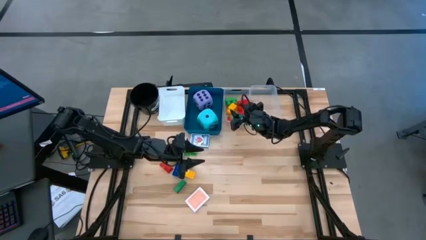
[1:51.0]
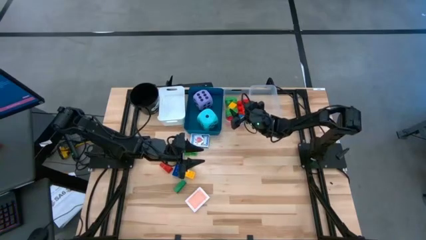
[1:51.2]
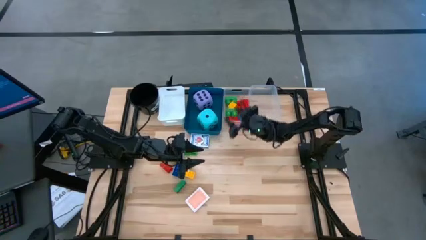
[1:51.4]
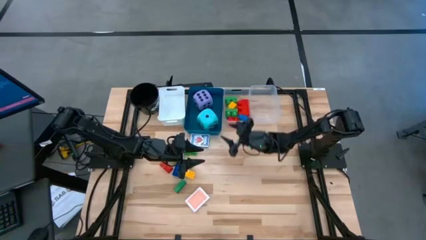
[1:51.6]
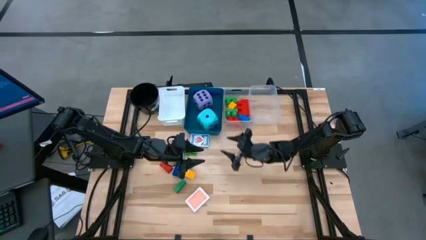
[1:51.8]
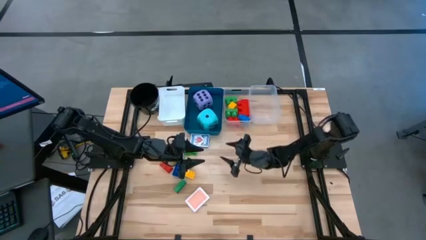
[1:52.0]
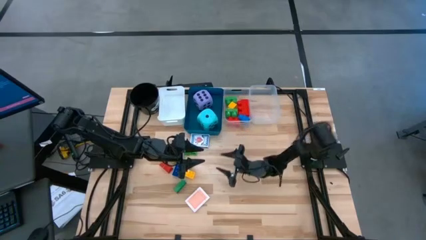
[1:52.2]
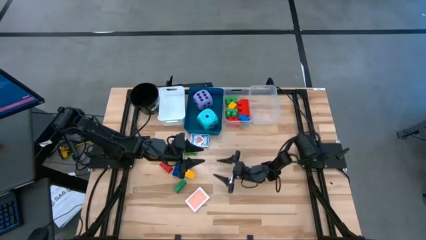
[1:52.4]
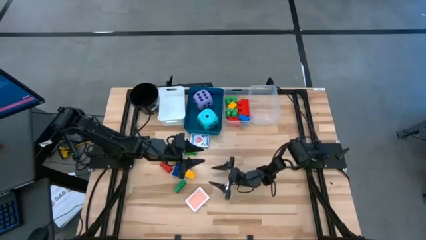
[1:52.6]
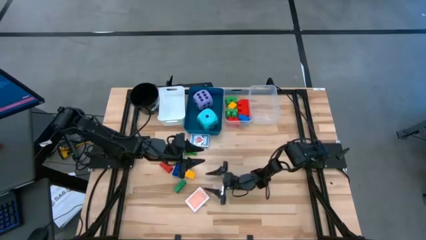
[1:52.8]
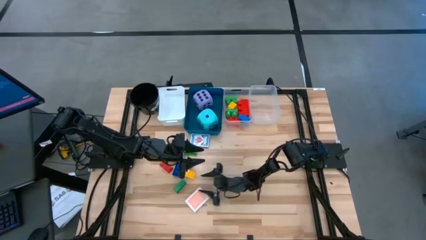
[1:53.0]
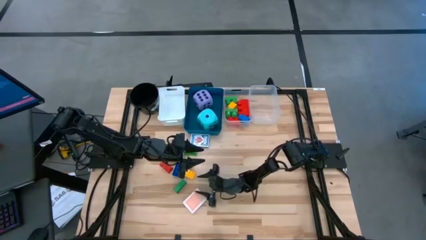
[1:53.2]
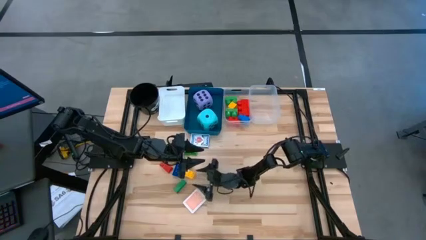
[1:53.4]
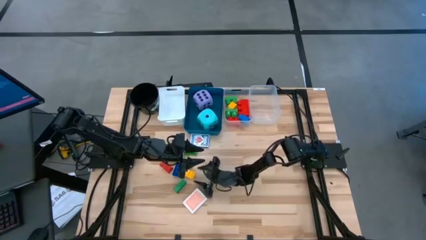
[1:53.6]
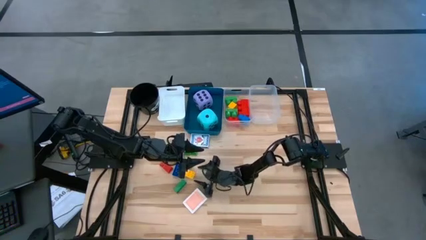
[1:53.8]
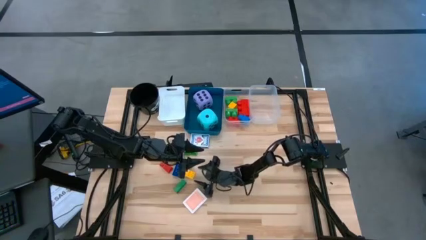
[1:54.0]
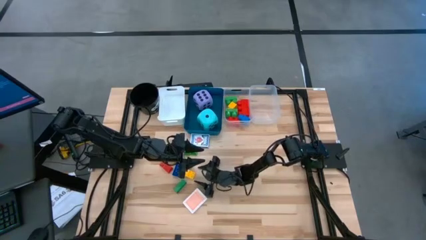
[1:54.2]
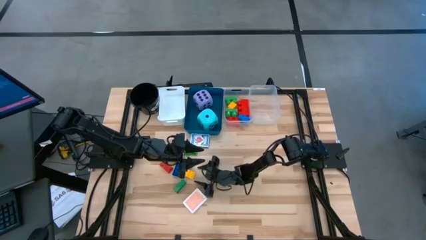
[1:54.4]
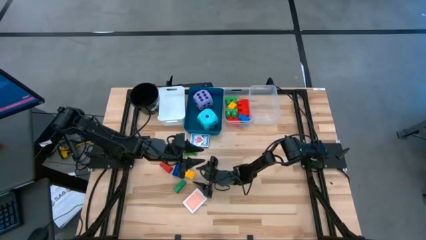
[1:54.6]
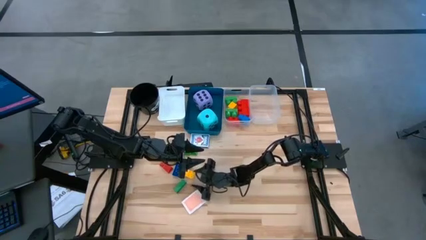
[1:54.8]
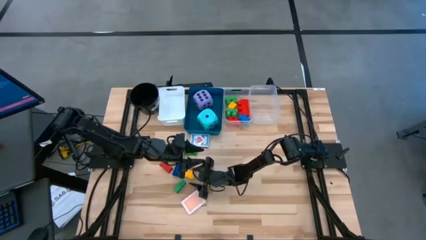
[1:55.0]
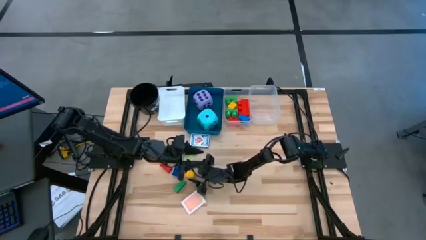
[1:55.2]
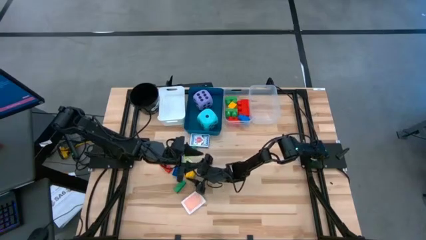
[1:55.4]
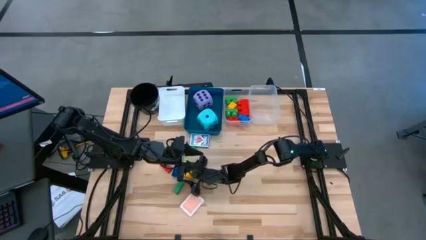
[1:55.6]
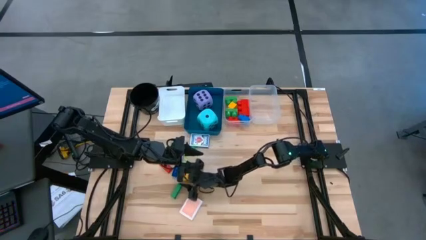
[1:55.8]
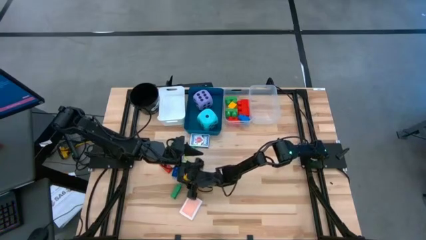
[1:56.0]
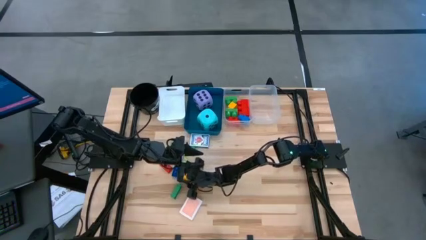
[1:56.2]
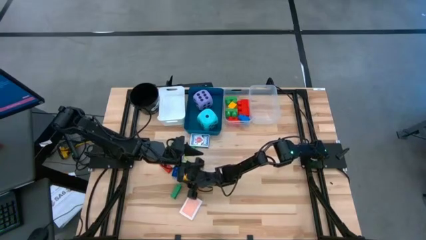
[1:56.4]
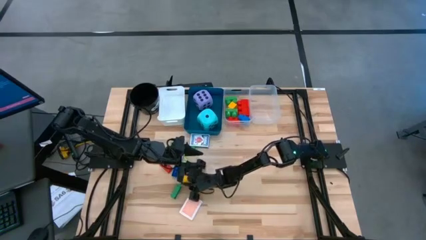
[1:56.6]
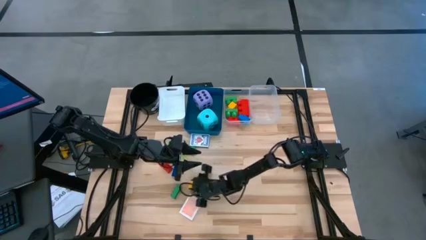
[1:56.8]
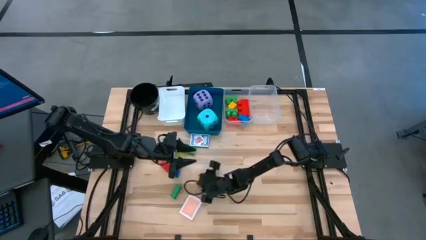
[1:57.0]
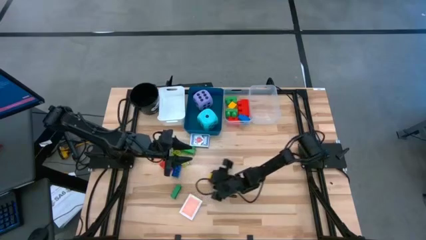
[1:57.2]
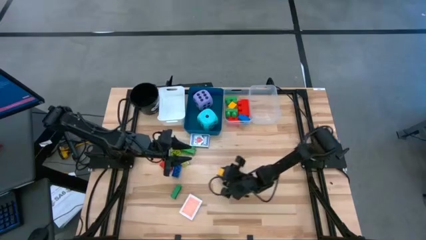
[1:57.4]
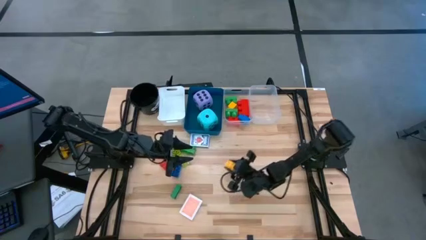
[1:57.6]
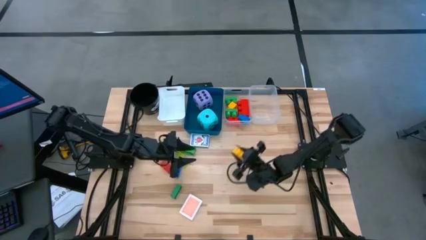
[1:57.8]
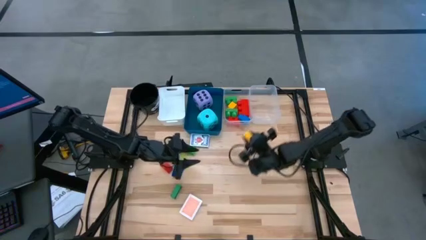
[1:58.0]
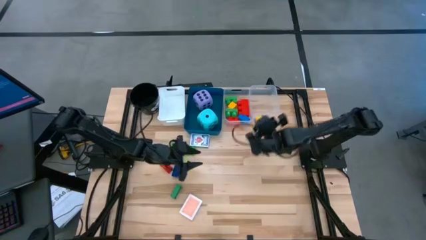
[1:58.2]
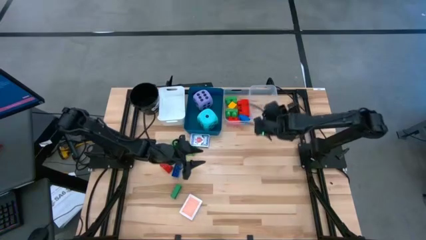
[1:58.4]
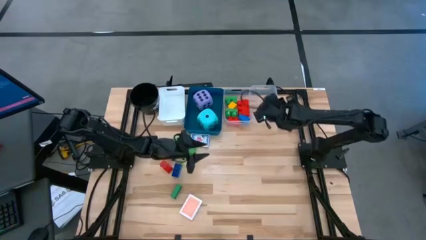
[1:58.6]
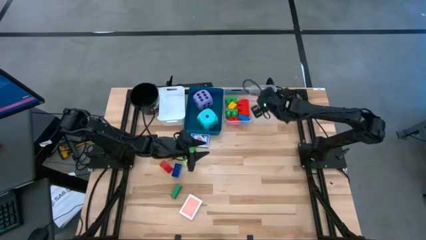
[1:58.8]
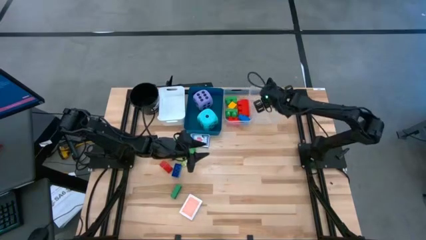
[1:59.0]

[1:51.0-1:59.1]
Task: Pick & Place Toys
Put the yellow 8 stud game piece into the left transparent bin

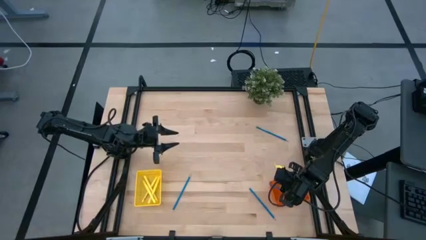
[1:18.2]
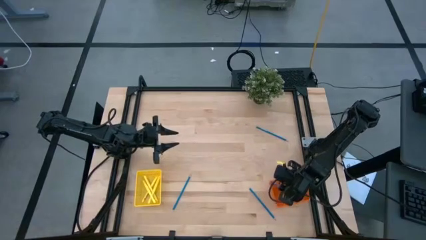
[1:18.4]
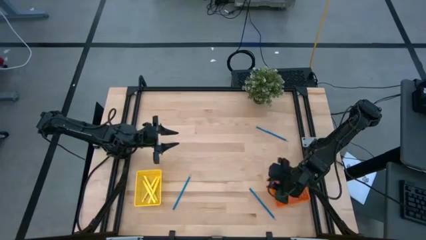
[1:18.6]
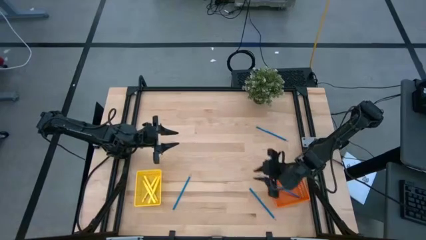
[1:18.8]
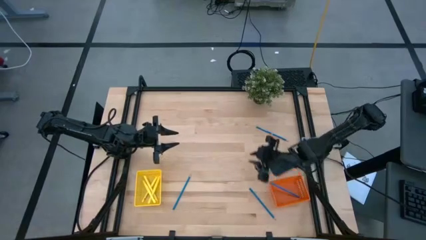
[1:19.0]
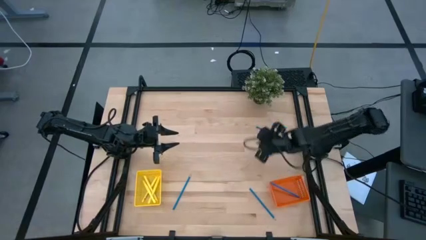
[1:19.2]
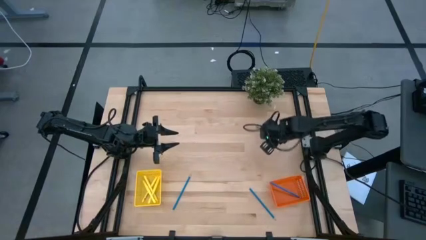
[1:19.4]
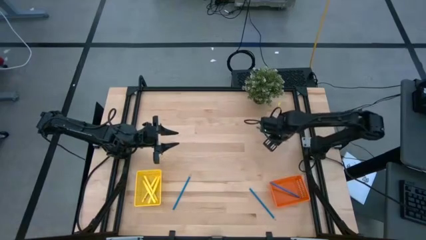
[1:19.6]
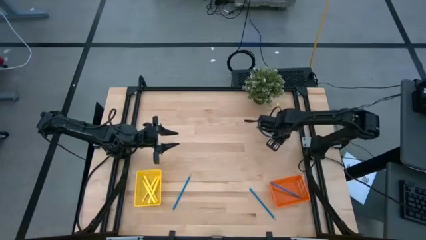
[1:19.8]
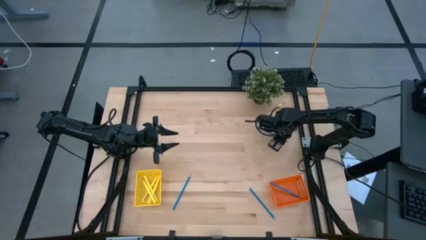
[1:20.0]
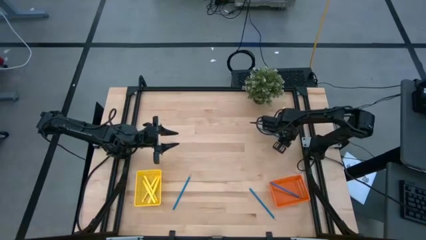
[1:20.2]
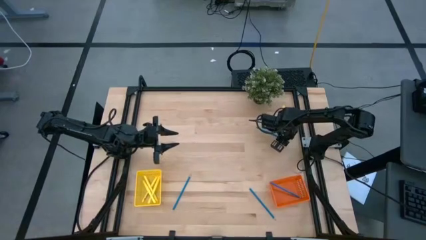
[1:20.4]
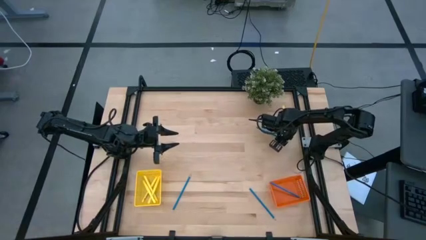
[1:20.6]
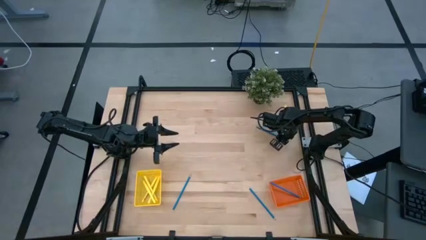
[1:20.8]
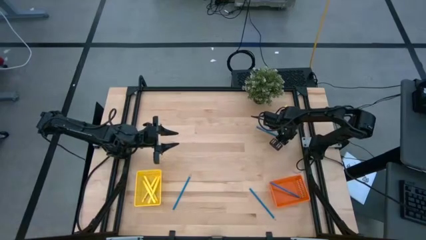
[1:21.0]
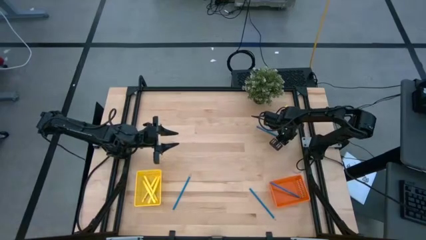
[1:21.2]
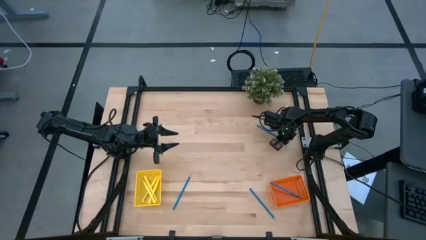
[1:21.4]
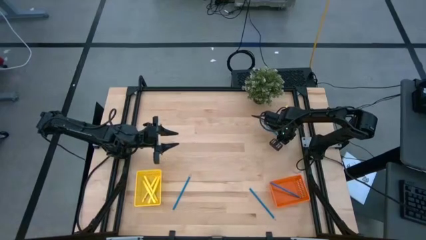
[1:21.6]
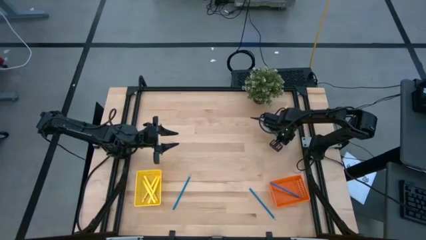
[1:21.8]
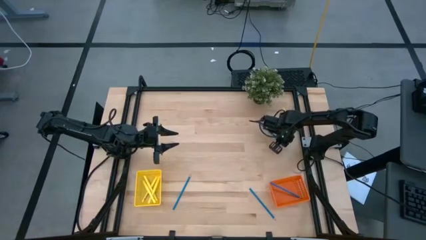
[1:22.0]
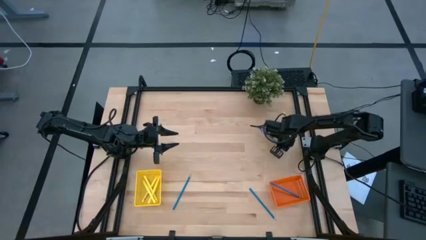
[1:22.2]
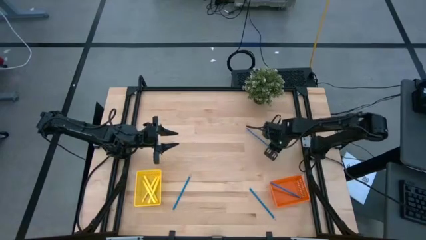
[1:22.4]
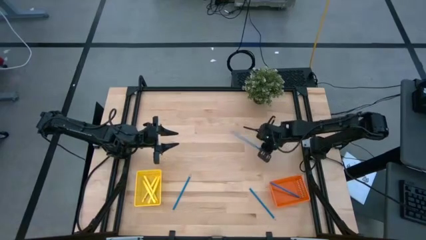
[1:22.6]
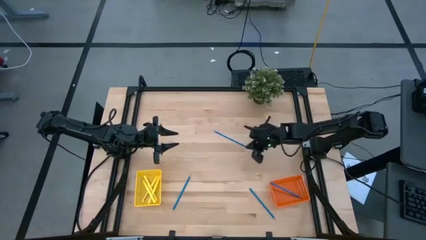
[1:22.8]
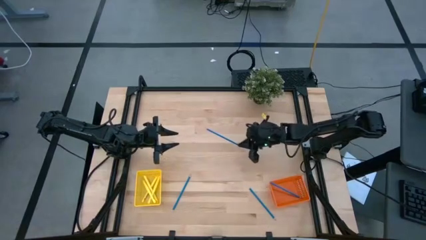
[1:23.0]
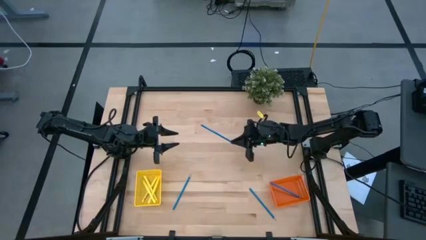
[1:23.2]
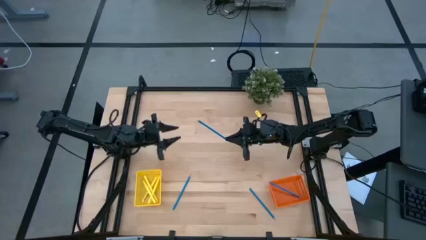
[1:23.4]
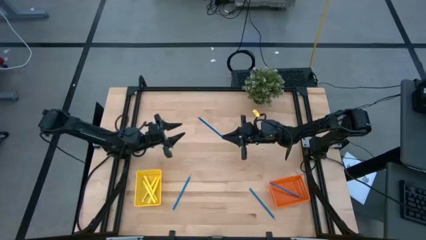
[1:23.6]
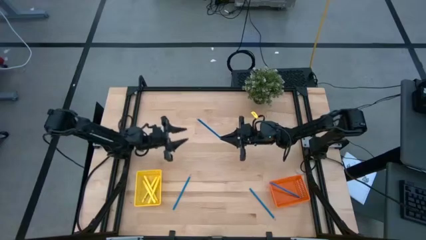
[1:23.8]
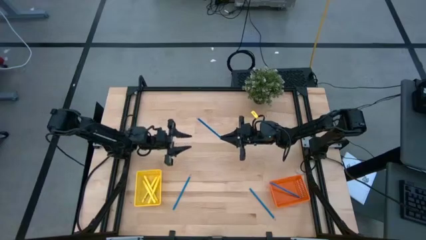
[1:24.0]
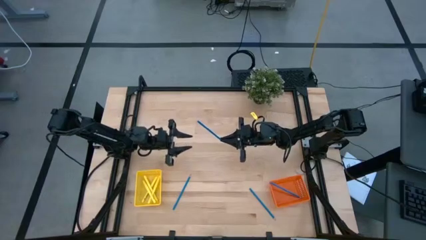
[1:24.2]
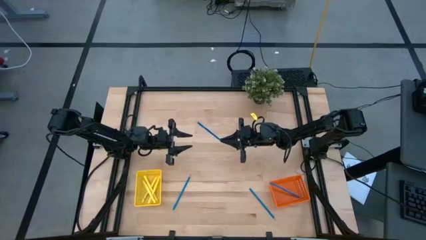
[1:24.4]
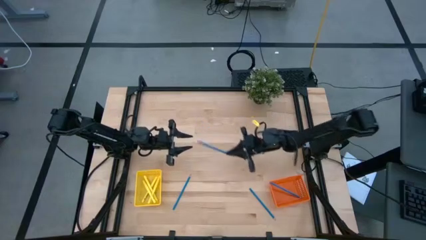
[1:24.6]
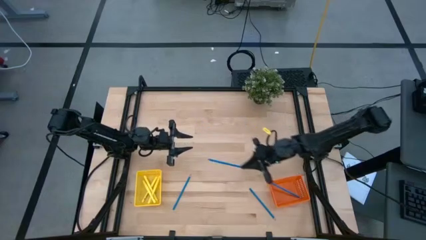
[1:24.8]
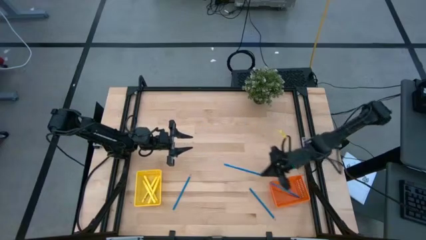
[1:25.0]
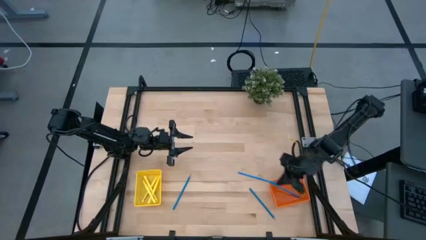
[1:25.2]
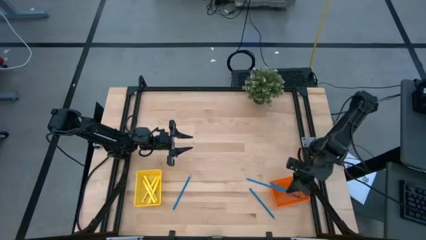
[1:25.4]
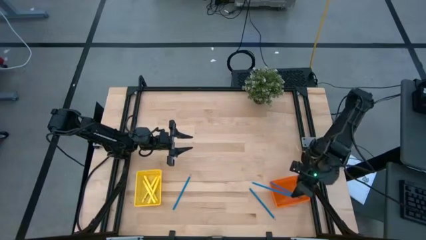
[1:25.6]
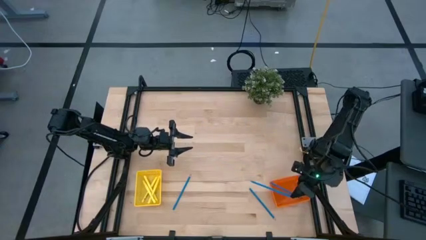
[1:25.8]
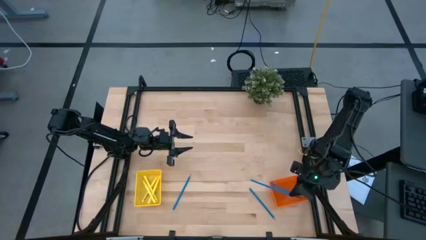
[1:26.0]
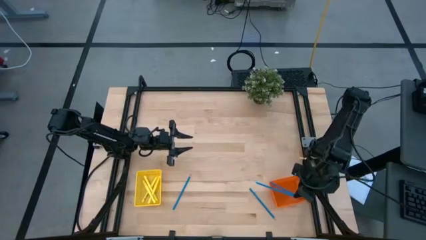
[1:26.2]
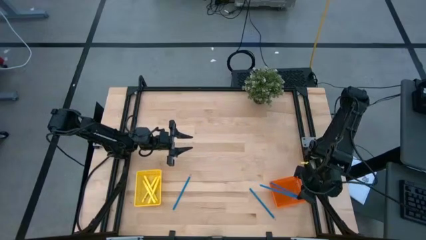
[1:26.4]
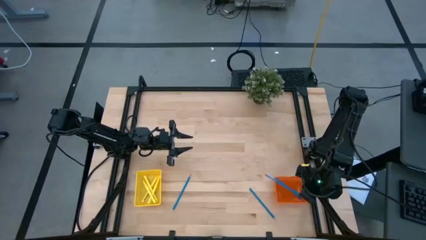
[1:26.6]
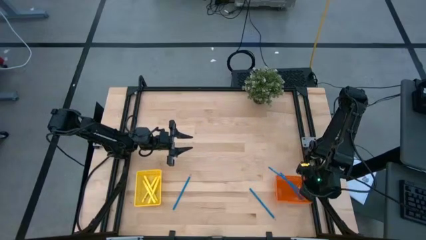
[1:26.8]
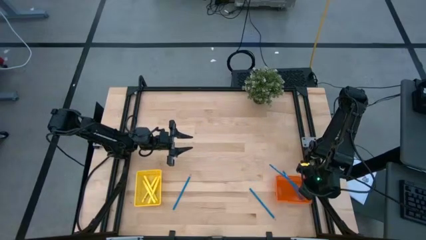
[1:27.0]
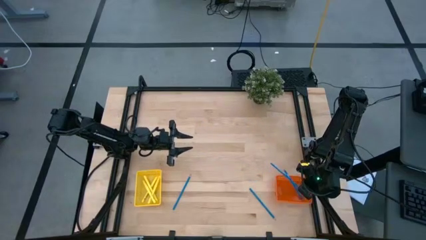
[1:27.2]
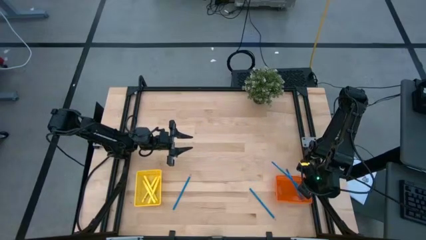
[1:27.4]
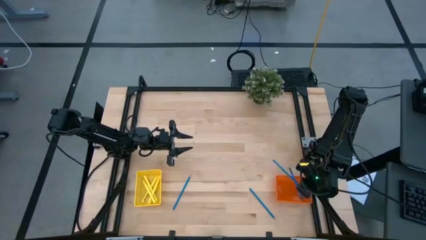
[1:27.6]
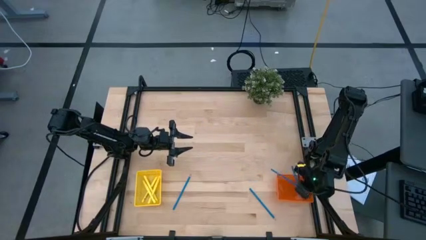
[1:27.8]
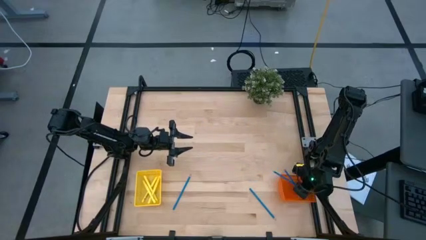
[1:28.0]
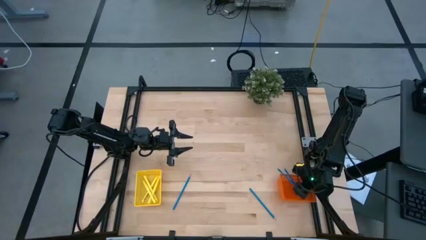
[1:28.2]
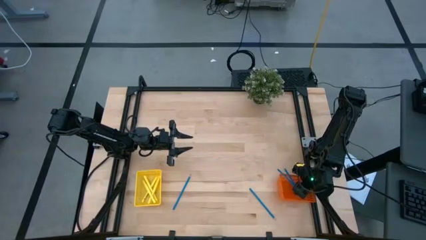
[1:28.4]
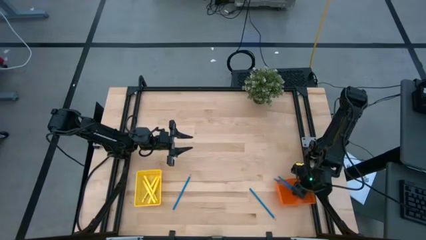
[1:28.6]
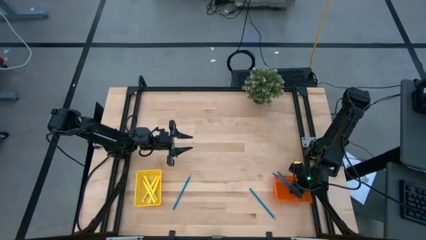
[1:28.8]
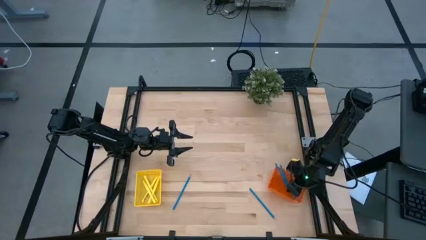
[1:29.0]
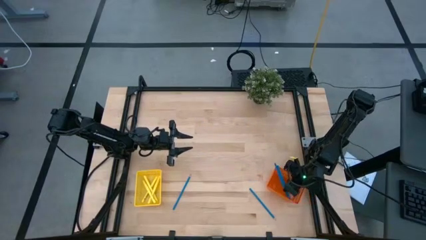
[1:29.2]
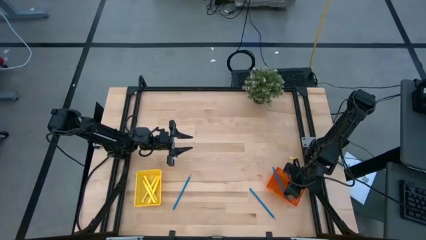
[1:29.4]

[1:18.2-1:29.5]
Task: Sort pens & pencils
Put the top blue pencil into the orange bin
